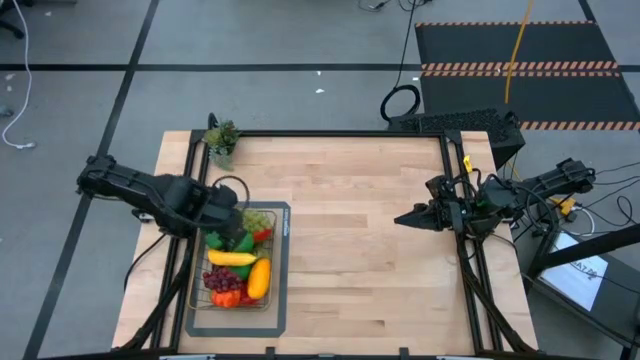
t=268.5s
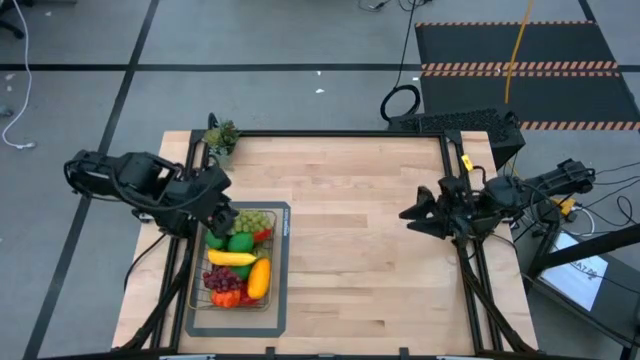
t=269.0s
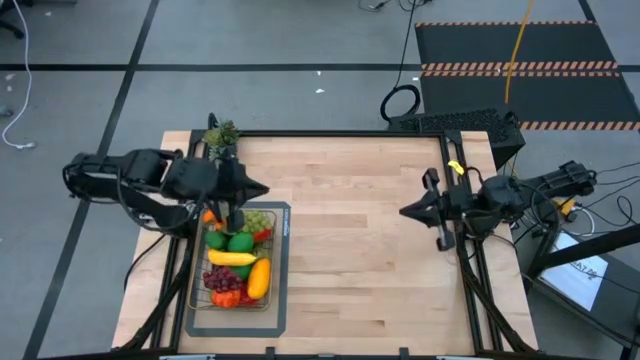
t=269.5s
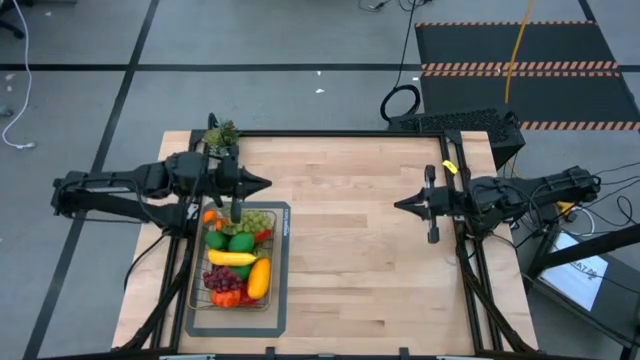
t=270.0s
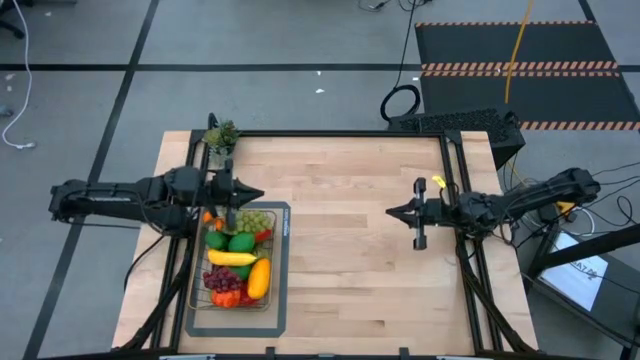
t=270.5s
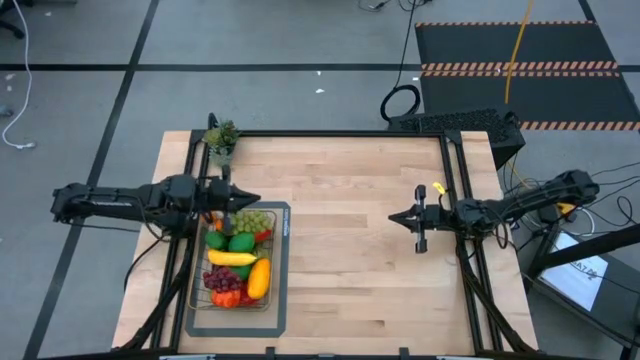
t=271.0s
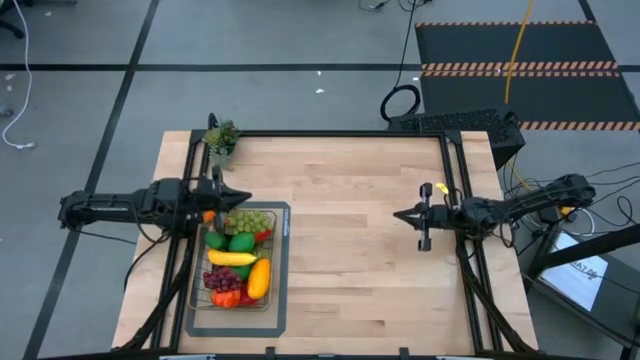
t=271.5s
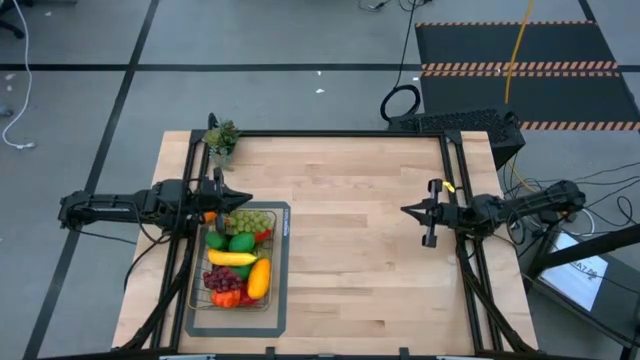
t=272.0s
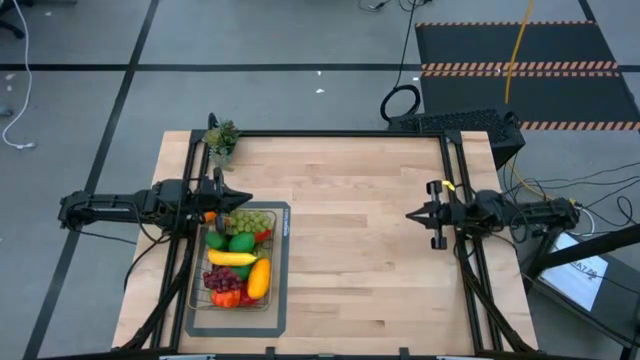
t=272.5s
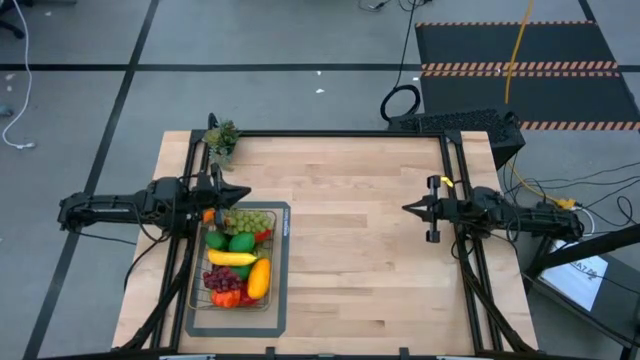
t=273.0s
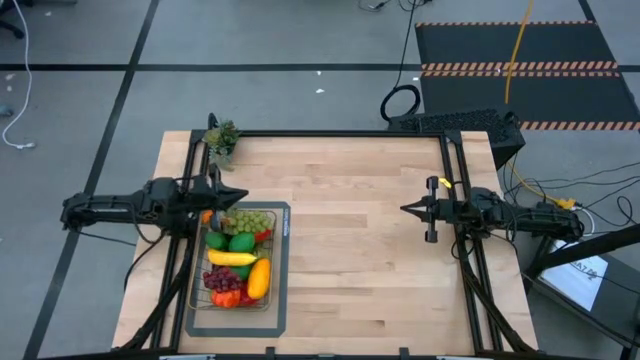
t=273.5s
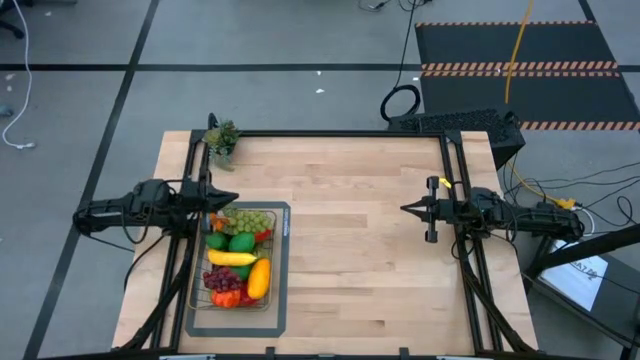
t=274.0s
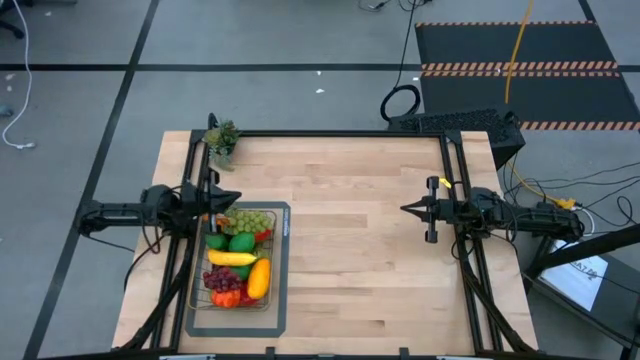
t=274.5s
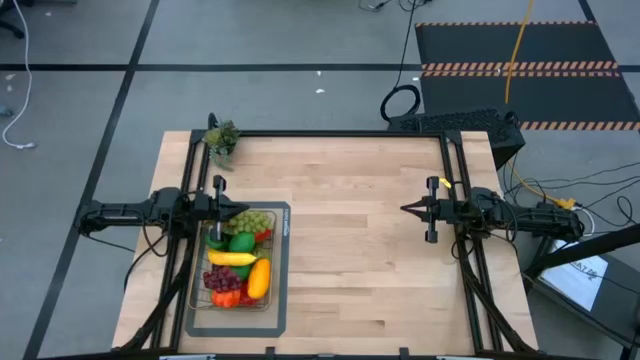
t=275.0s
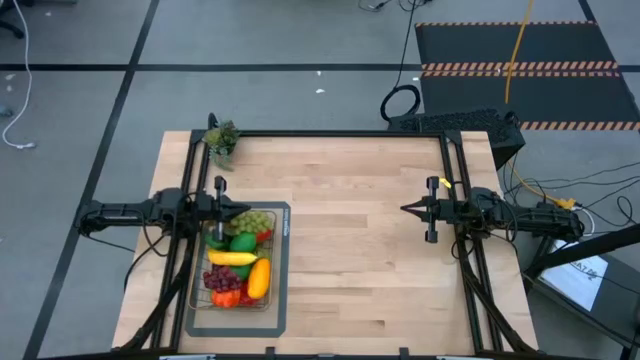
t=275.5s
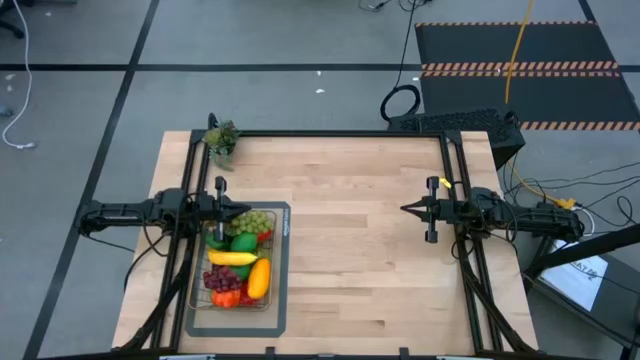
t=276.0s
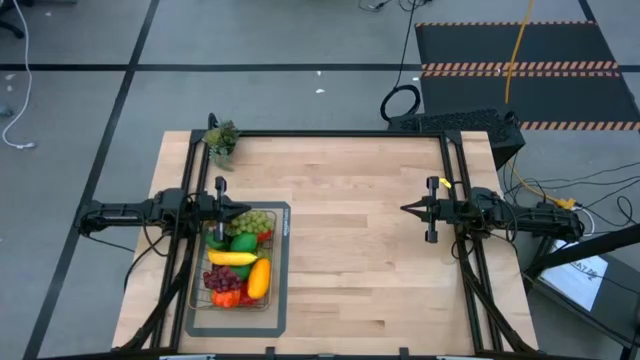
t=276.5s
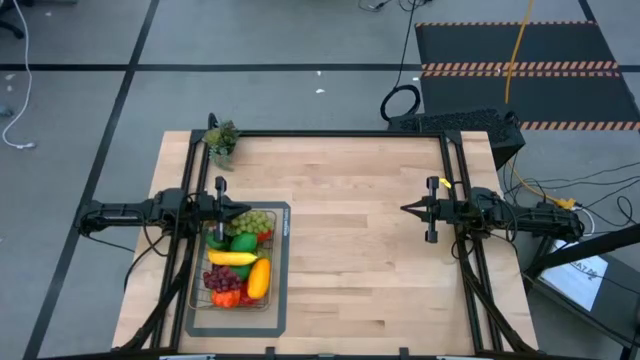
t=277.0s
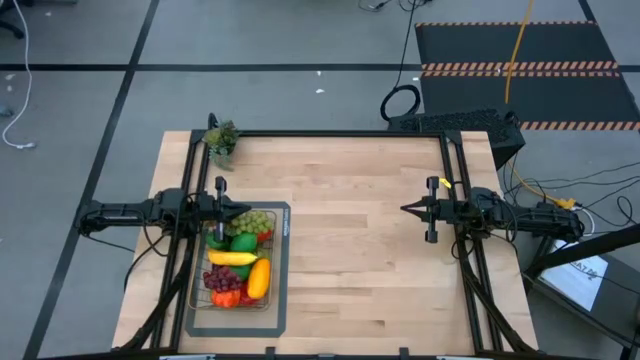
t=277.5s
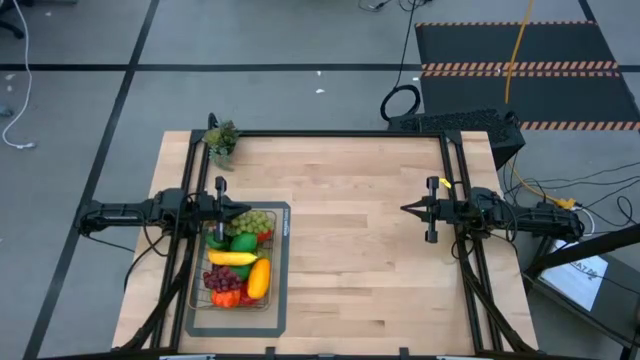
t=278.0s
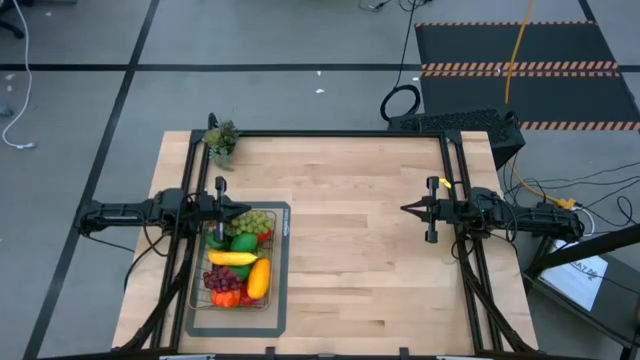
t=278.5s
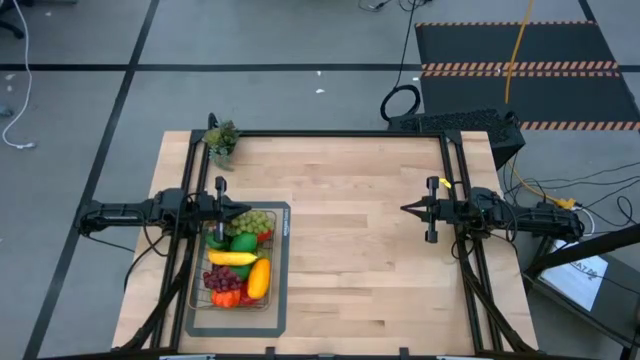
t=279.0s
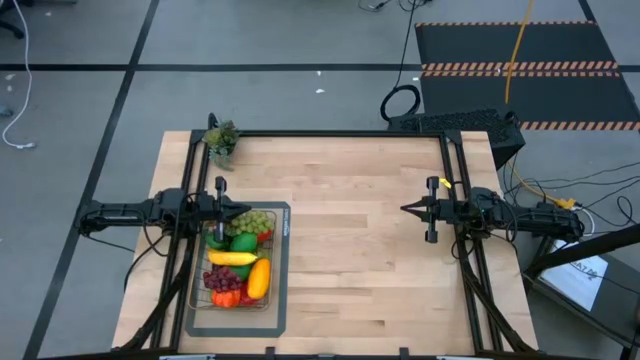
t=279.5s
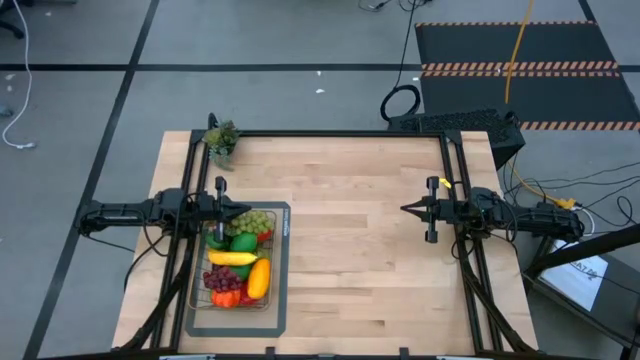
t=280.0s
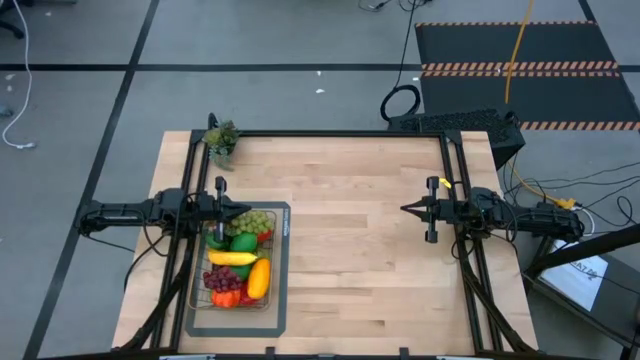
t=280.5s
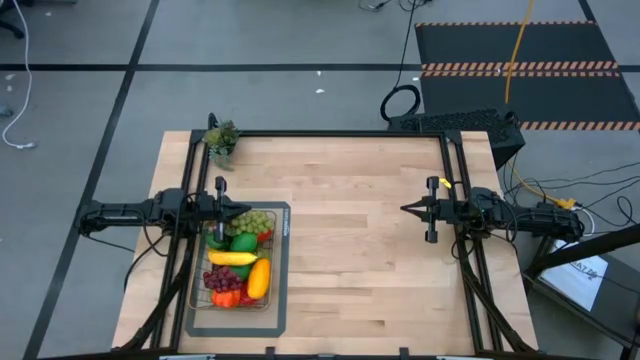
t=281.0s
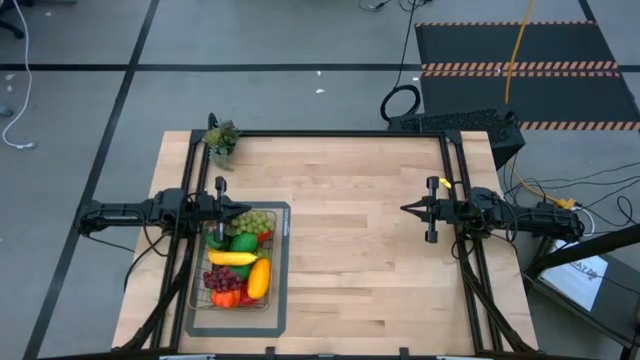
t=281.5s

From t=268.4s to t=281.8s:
Task: Build produce basket
Return to Home Position

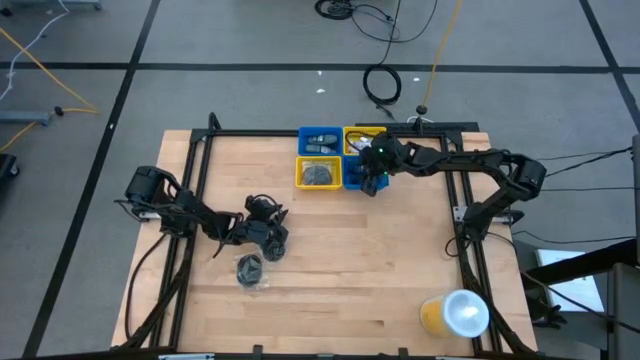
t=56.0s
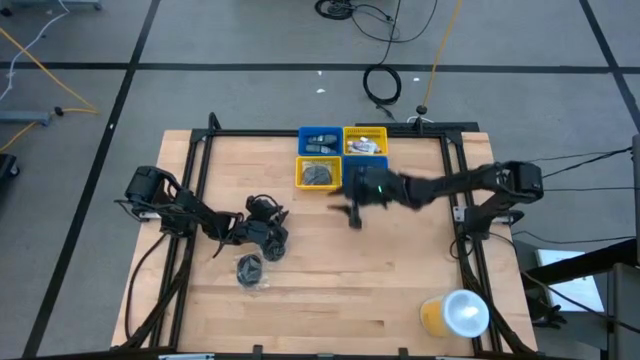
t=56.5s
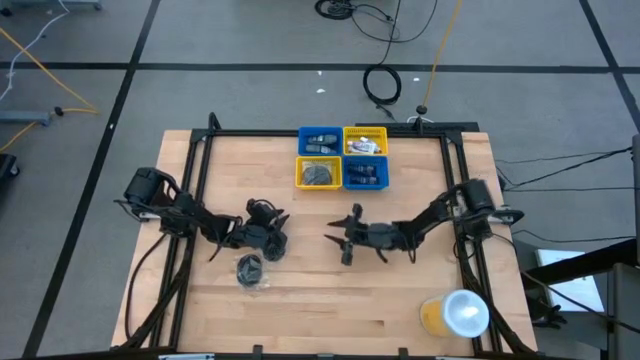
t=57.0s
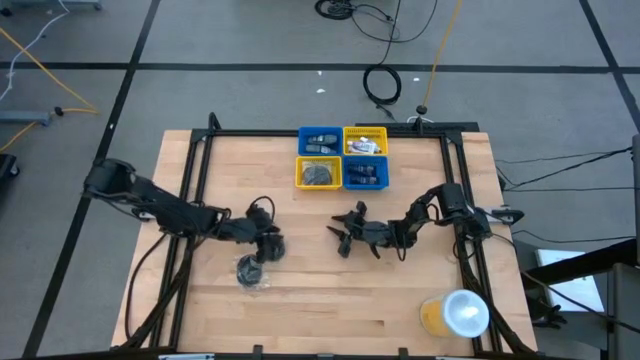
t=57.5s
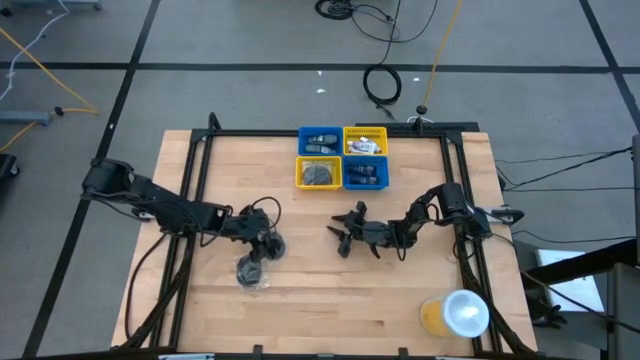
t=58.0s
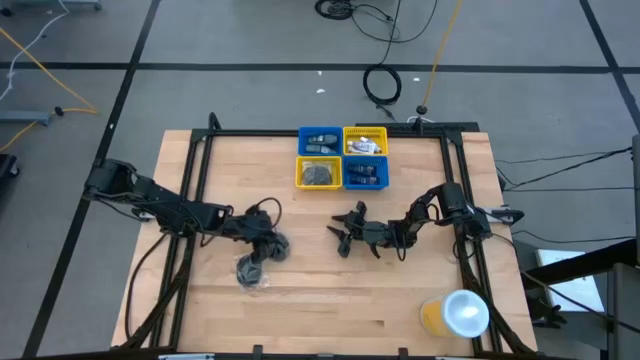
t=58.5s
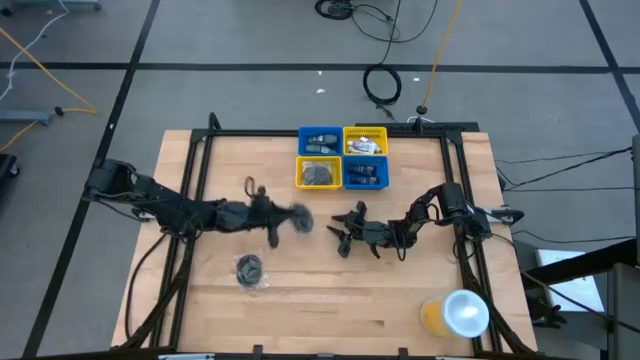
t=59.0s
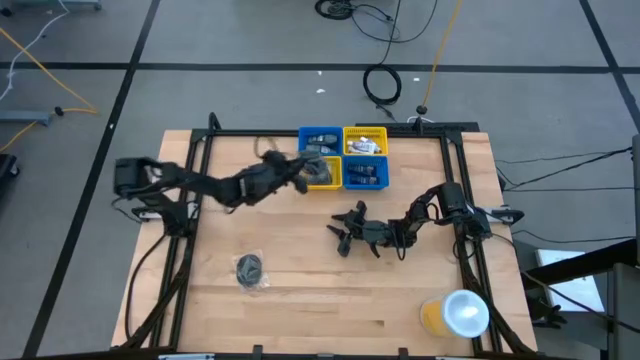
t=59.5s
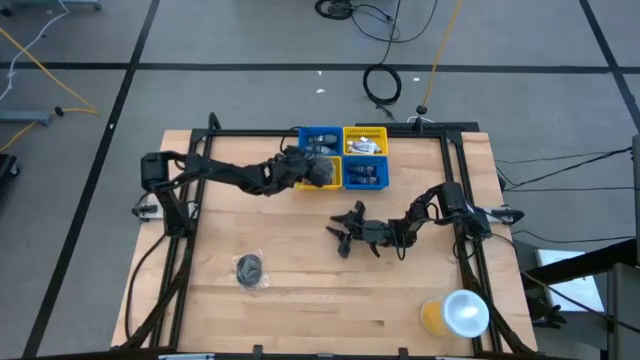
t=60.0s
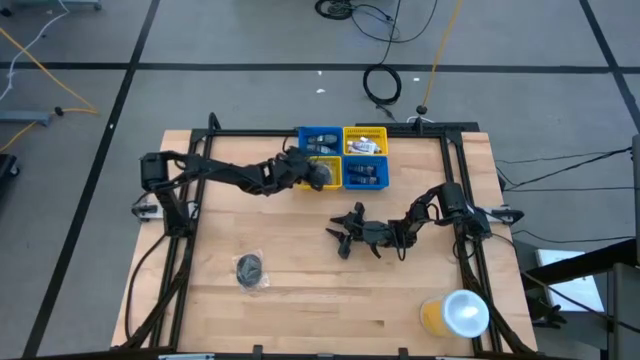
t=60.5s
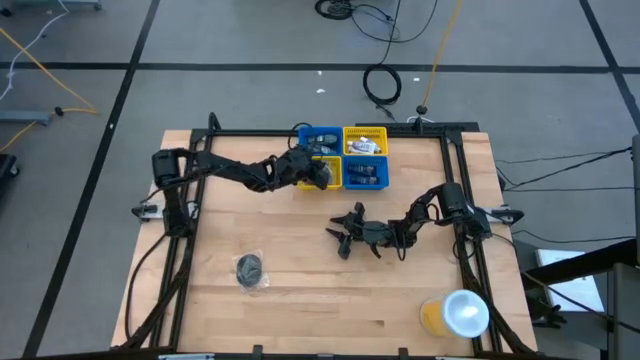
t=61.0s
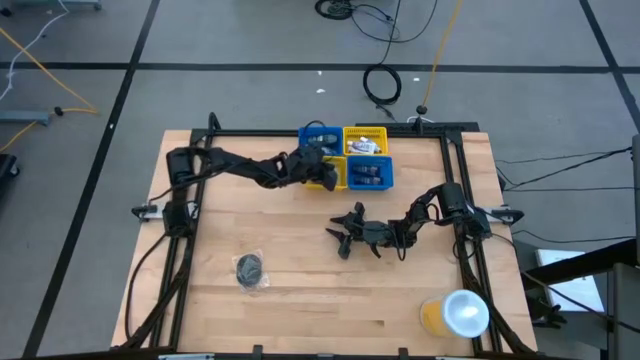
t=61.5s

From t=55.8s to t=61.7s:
Task: Pick & Place Travel size toiletries
Put the black hairbrush into the left yellow bin

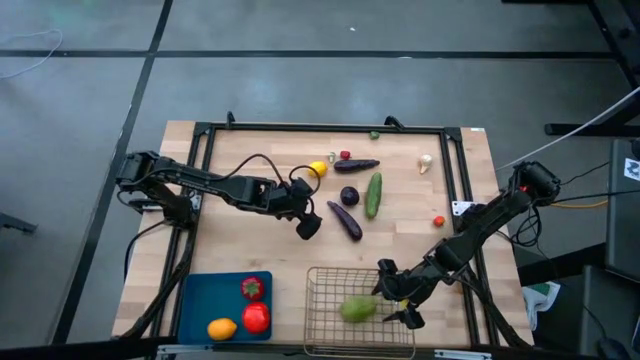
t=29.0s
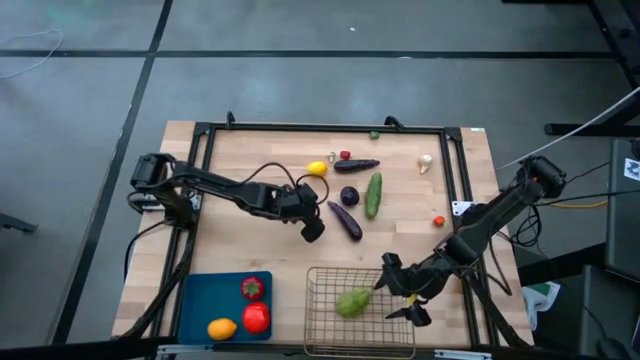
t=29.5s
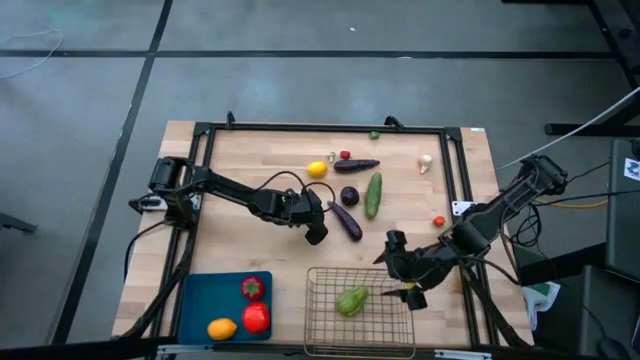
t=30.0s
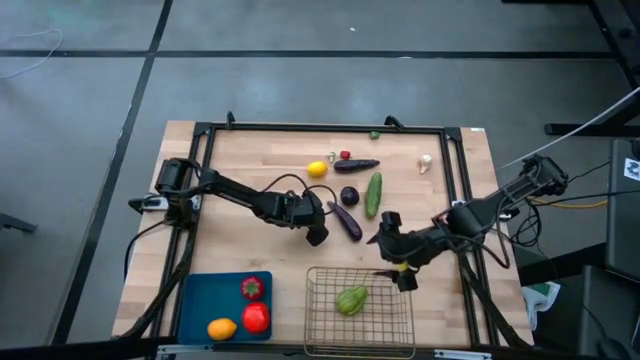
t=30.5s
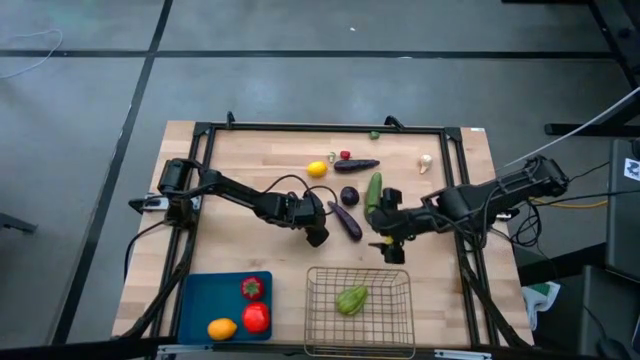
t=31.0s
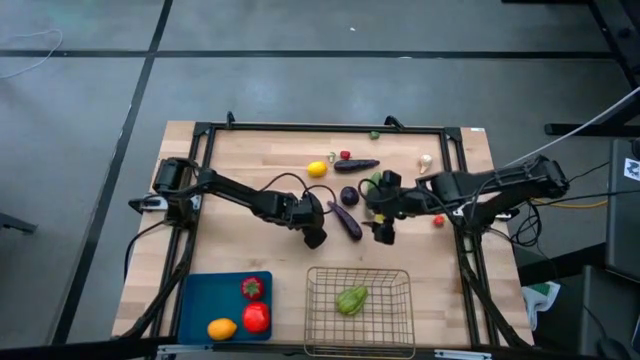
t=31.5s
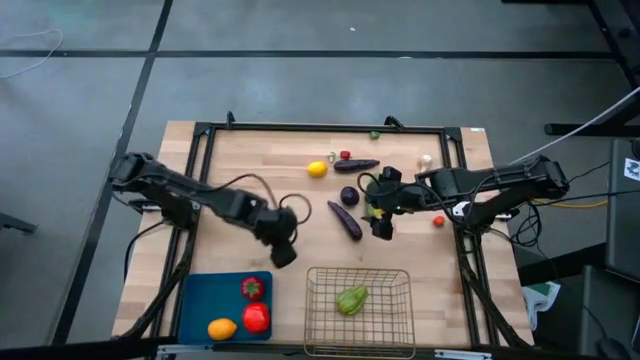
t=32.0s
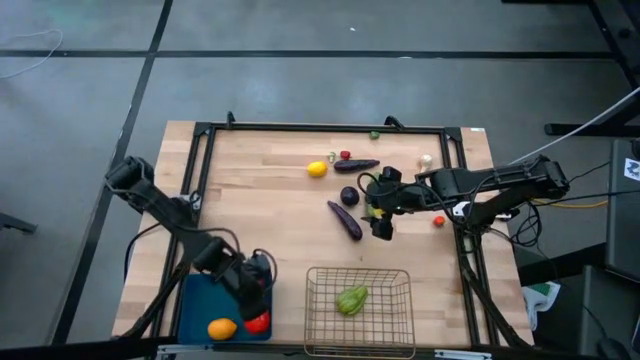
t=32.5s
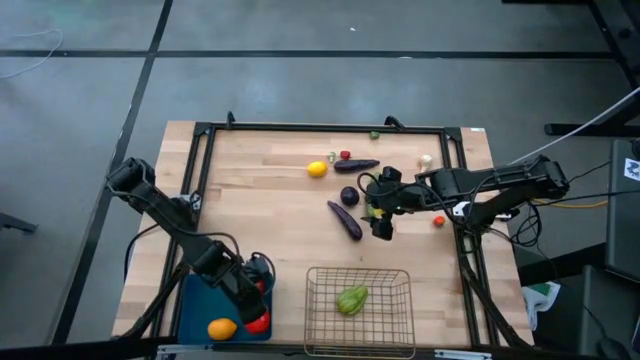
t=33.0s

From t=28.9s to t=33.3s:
Task: Sort produce into baskets
Put the small tomato into the blue bin
